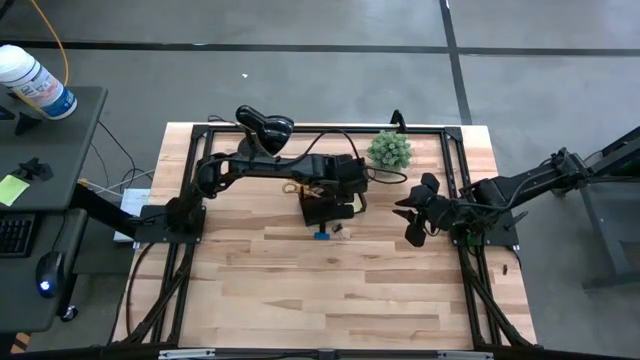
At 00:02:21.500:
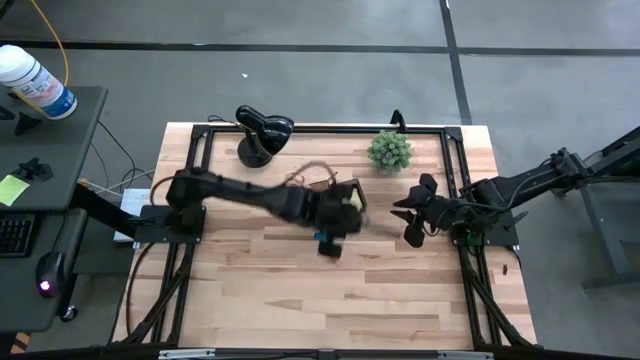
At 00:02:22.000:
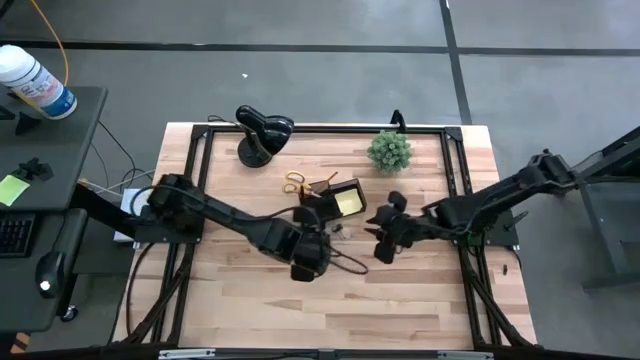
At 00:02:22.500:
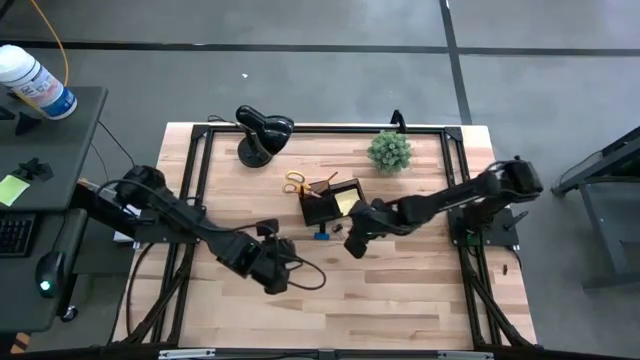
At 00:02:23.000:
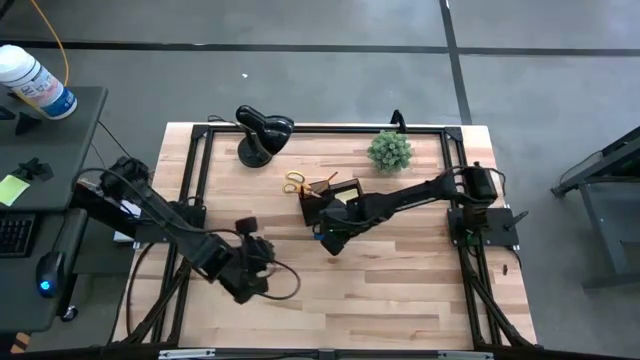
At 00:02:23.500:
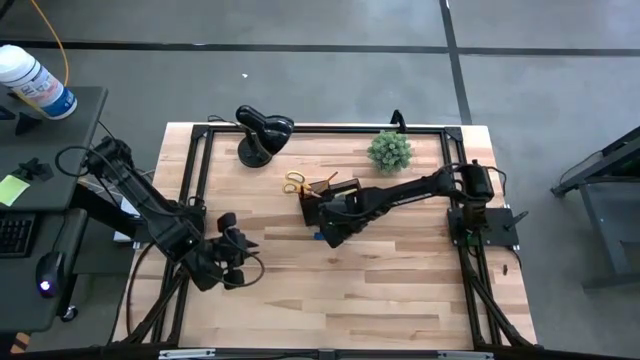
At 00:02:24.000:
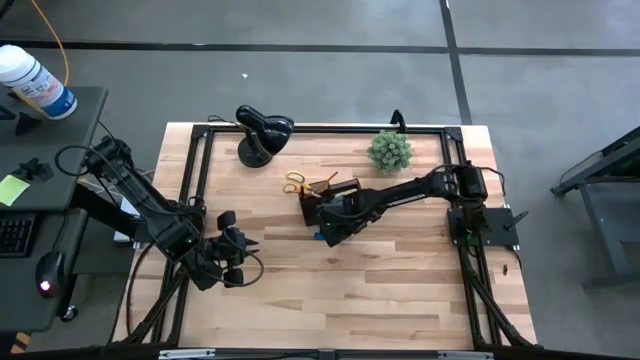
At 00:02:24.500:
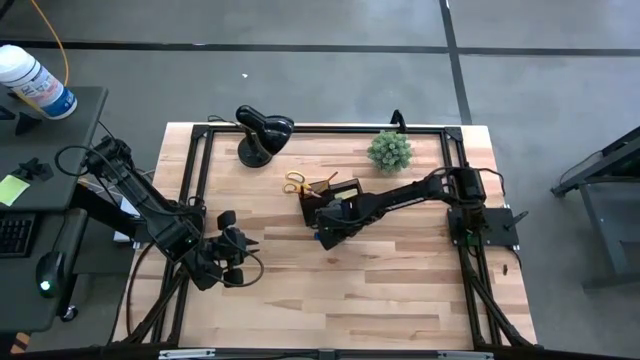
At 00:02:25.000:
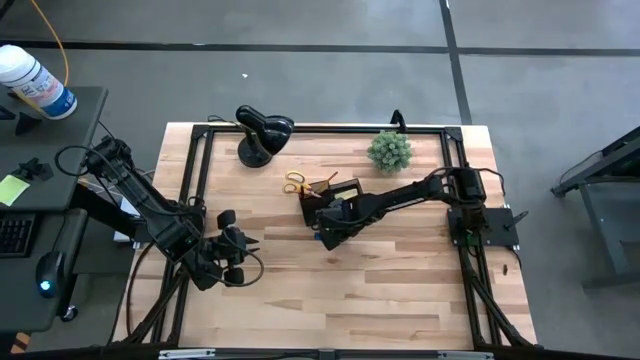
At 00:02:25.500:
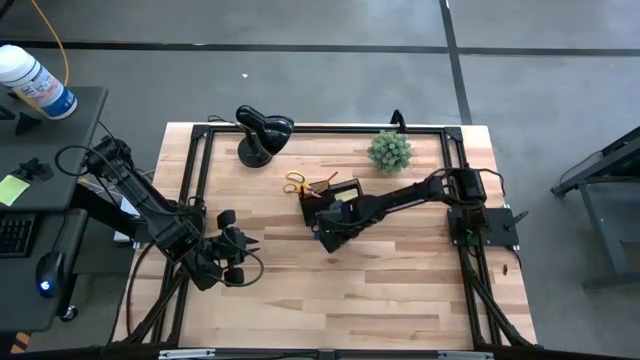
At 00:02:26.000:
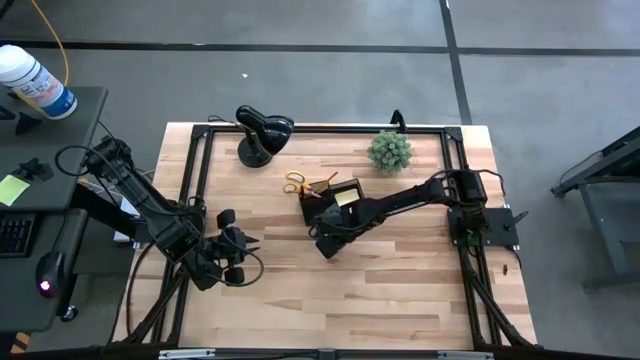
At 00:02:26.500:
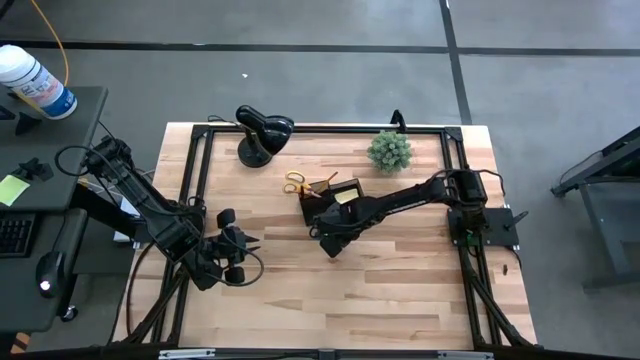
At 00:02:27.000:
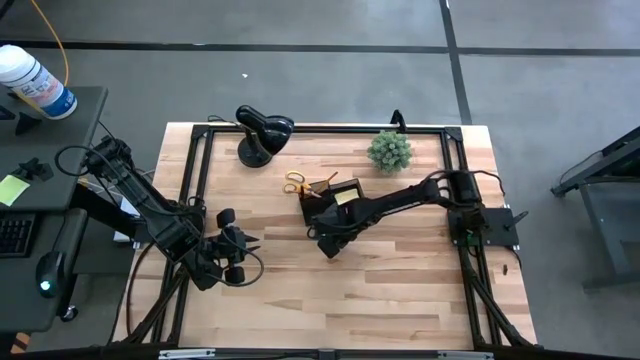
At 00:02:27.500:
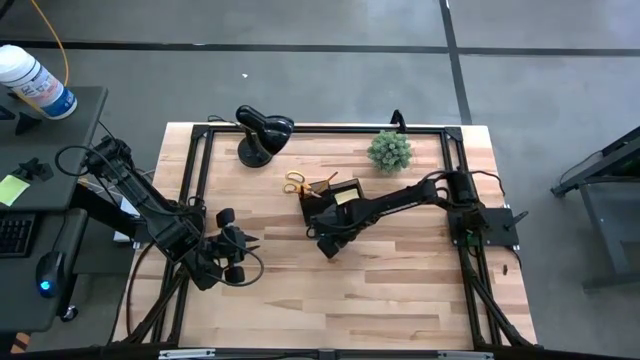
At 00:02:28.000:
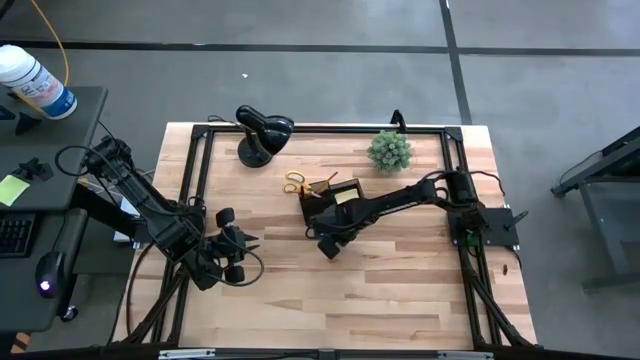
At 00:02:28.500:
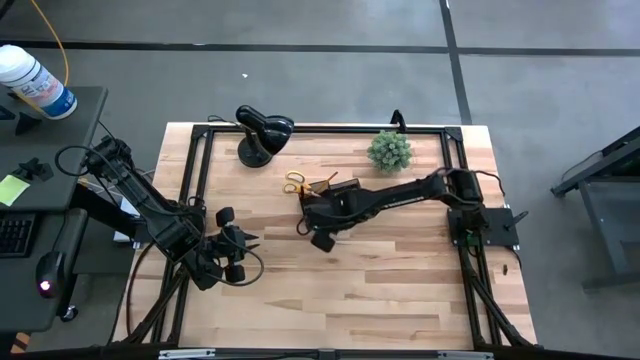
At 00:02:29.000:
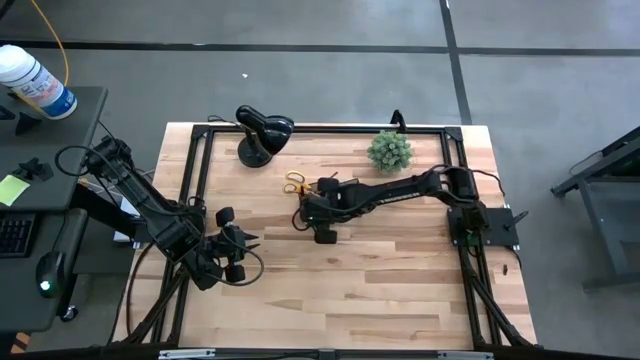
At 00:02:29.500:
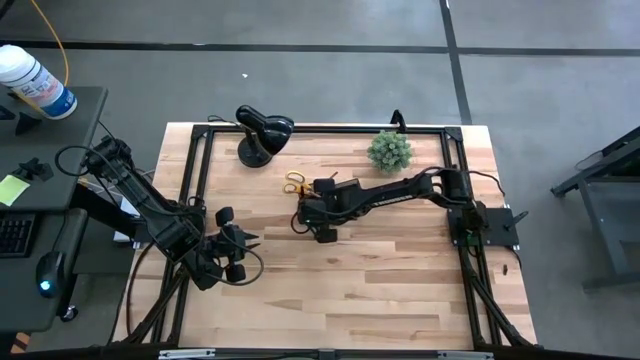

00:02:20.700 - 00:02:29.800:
Task: Pick and place office supplies into organizer
Put the right black binder clip into the black desk organizer

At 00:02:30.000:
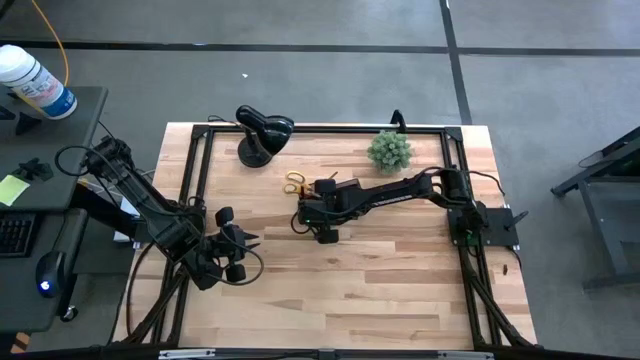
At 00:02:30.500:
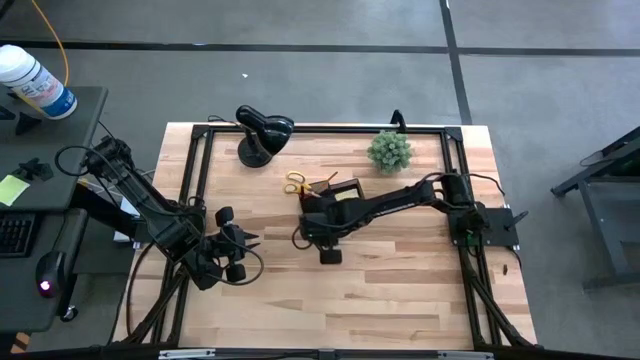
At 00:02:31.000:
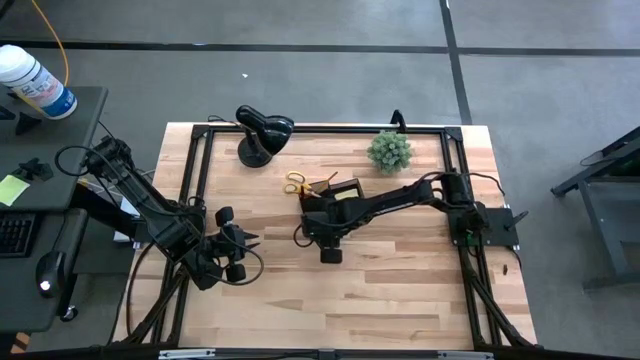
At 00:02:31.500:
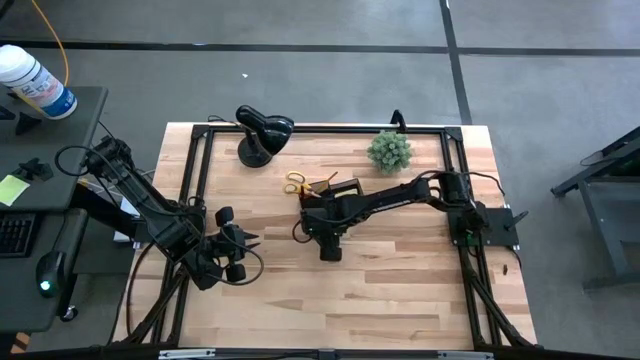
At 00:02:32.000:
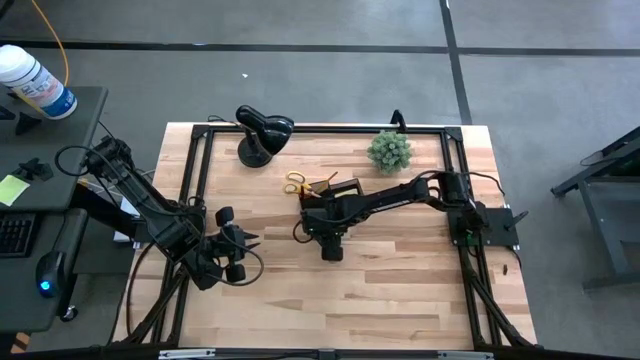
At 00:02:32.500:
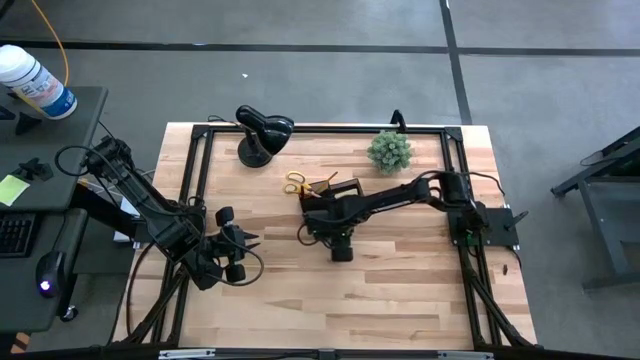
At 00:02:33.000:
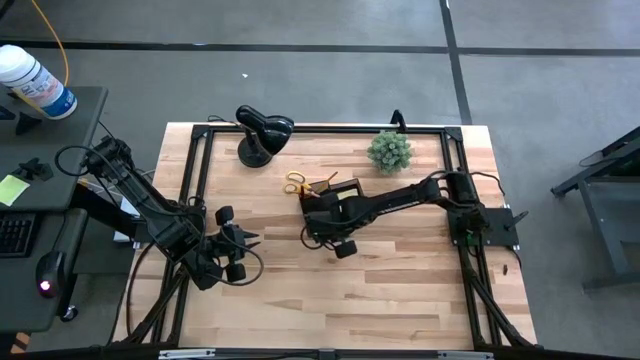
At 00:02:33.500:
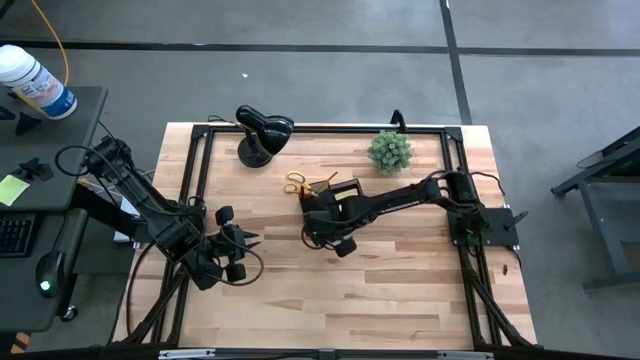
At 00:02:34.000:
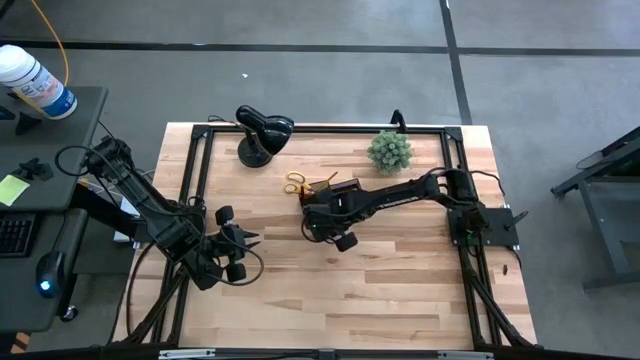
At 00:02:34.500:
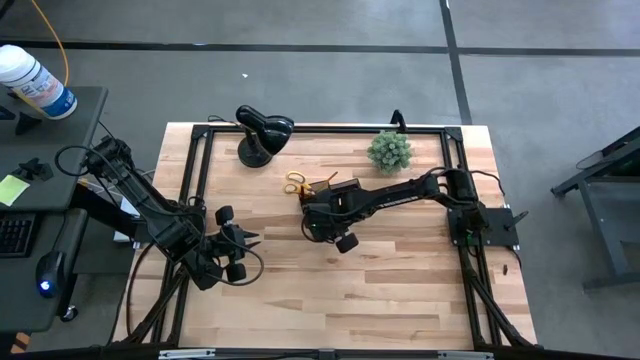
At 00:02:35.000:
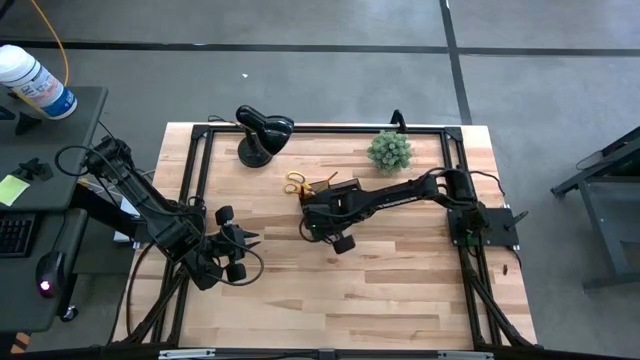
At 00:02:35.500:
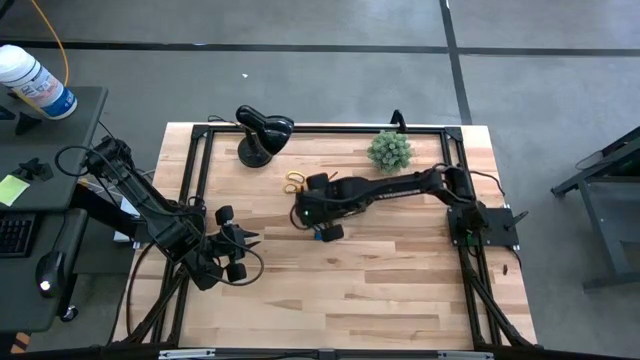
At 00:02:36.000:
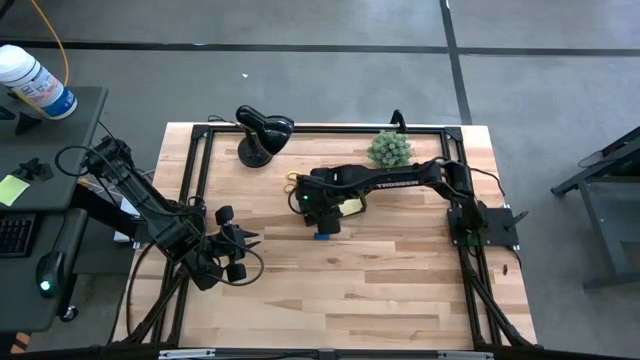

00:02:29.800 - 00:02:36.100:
Put the black binder clip into the black desk organizer

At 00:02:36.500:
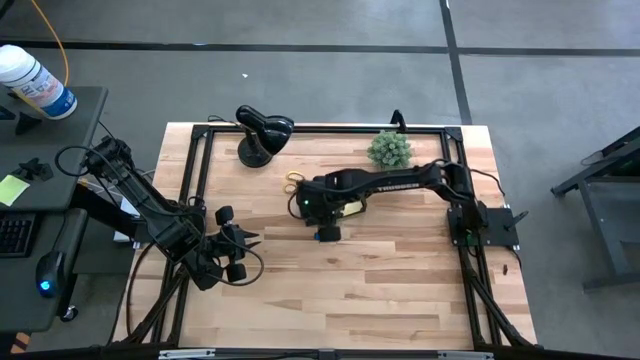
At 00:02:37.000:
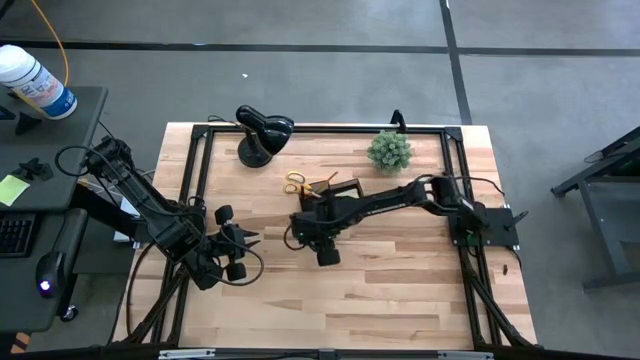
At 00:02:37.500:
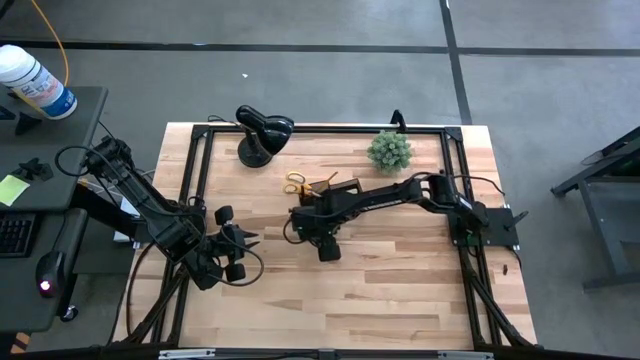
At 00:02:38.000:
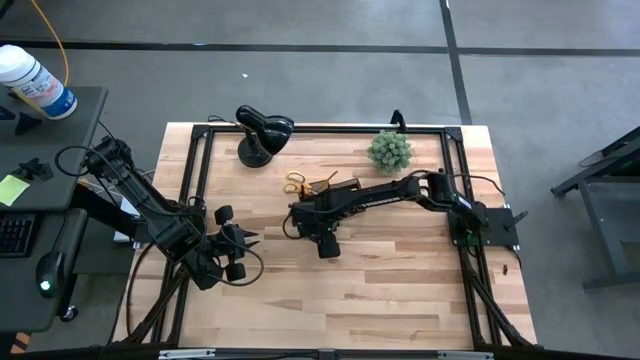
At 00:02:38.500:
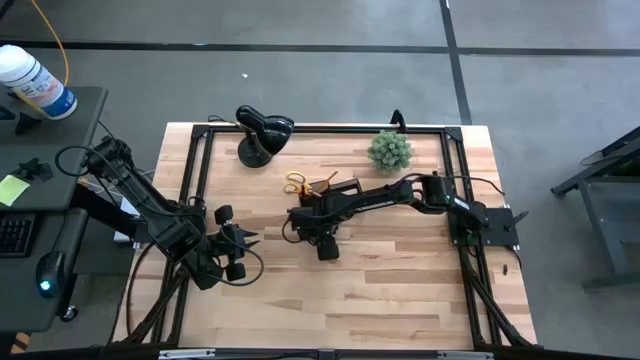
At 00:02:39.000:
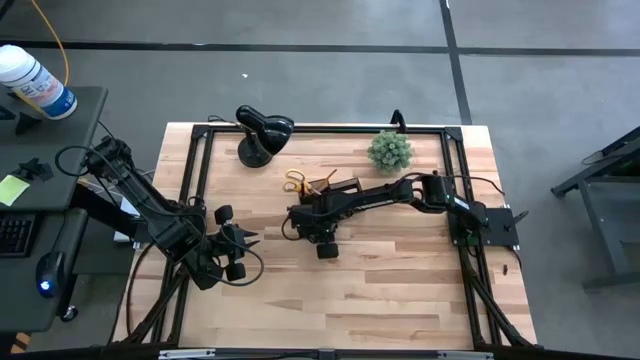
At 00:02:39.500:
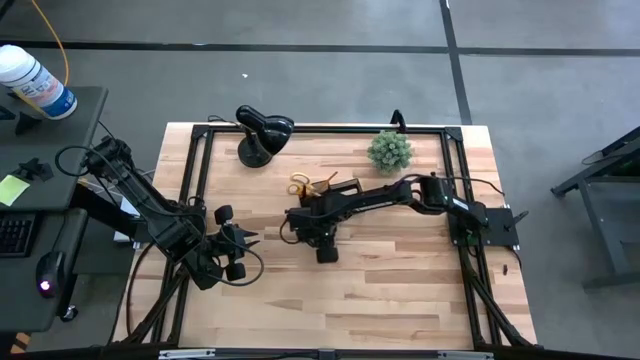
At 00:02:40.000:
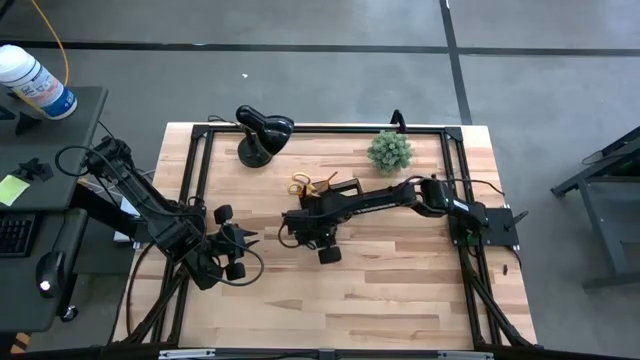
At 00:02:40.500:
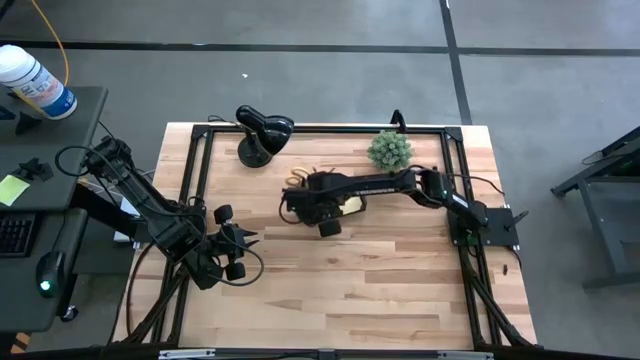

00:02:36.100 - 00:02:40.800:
Put the blue eraser into the black desk organizer
